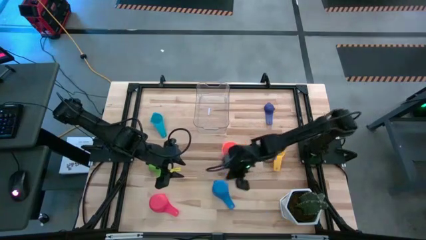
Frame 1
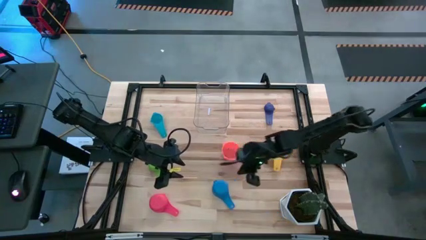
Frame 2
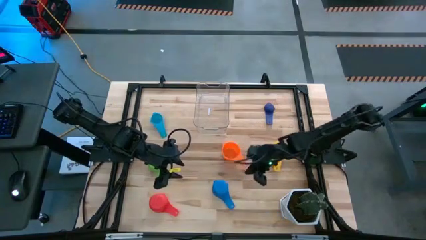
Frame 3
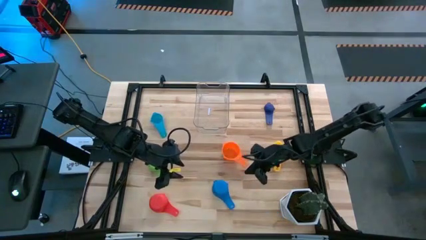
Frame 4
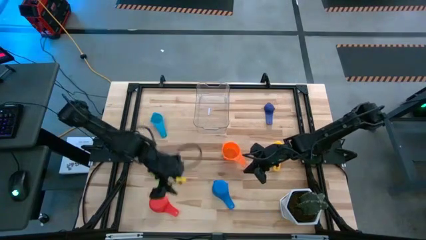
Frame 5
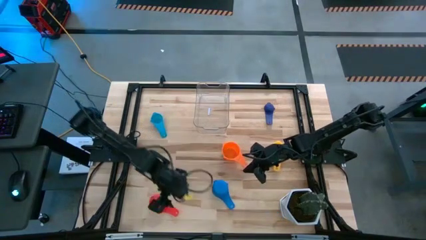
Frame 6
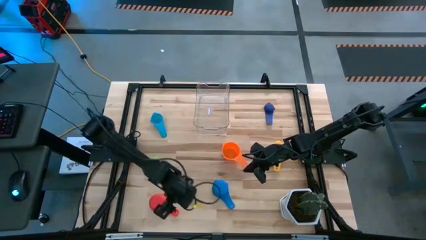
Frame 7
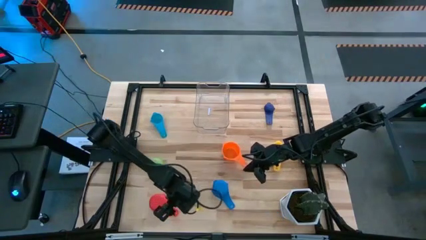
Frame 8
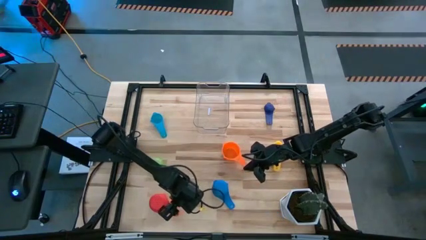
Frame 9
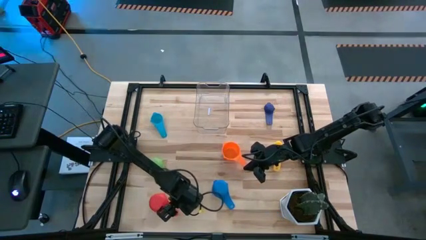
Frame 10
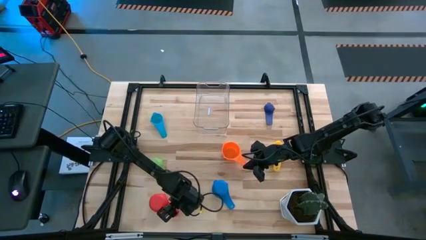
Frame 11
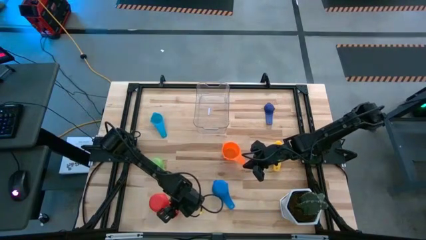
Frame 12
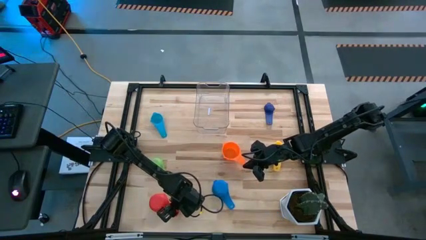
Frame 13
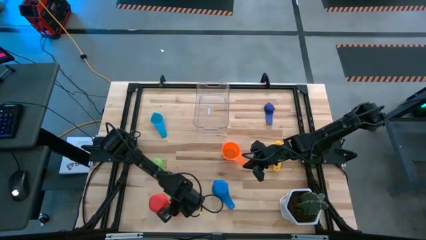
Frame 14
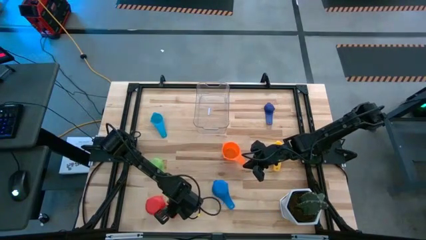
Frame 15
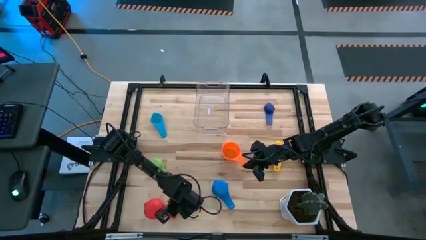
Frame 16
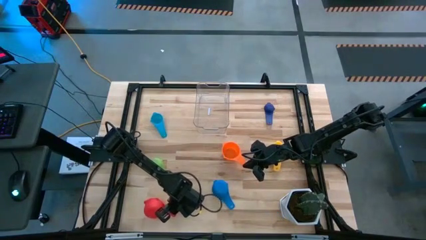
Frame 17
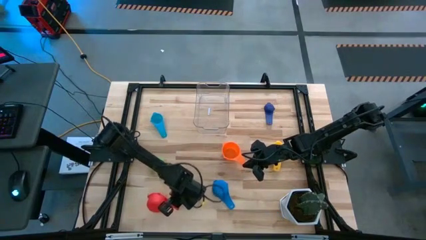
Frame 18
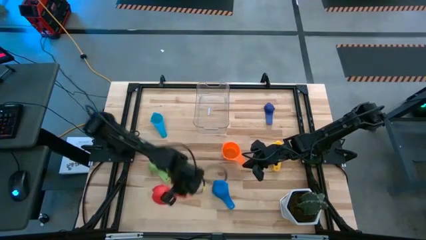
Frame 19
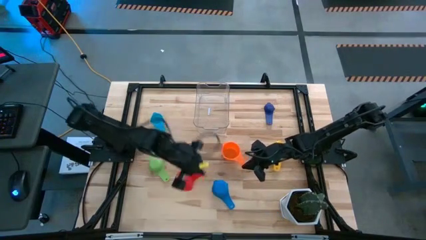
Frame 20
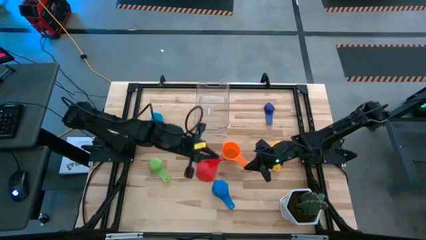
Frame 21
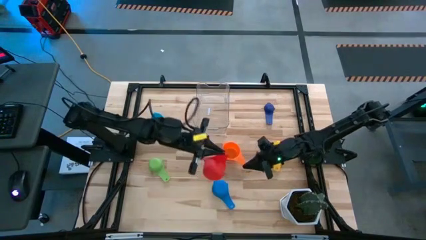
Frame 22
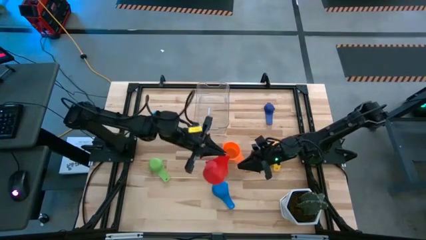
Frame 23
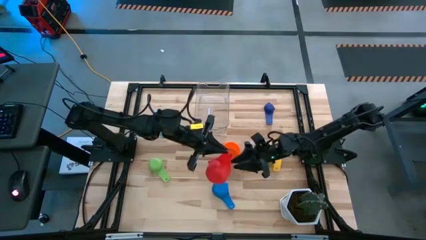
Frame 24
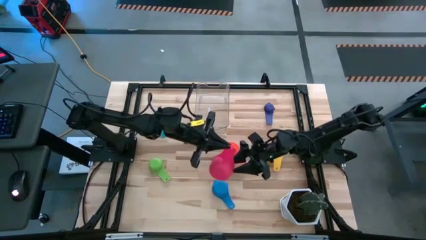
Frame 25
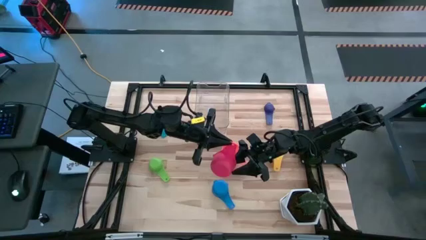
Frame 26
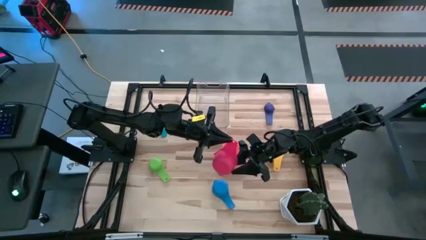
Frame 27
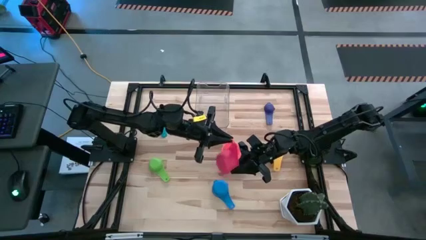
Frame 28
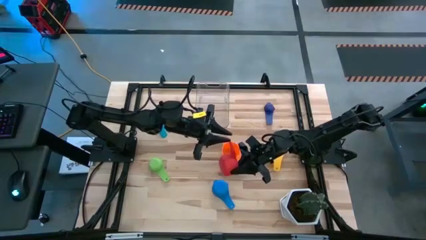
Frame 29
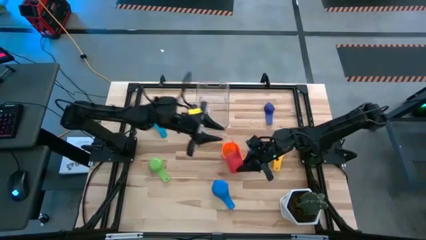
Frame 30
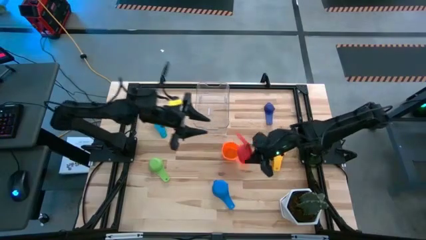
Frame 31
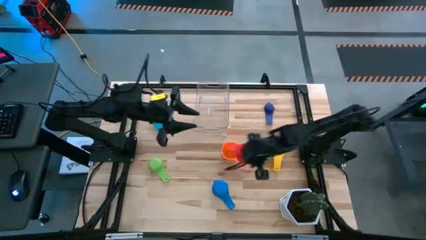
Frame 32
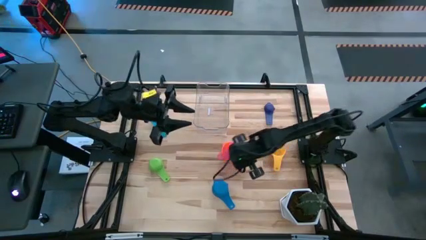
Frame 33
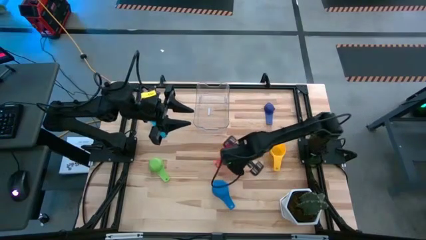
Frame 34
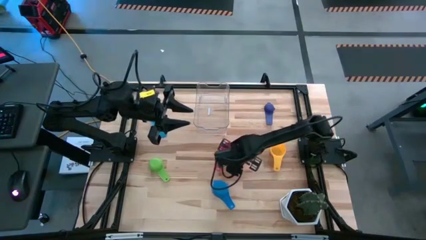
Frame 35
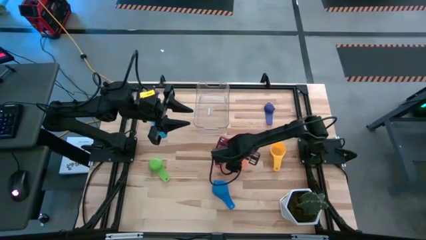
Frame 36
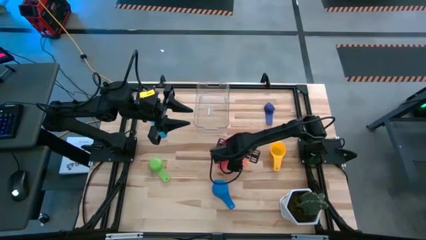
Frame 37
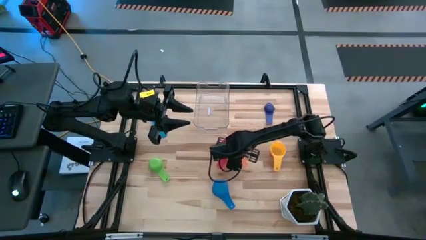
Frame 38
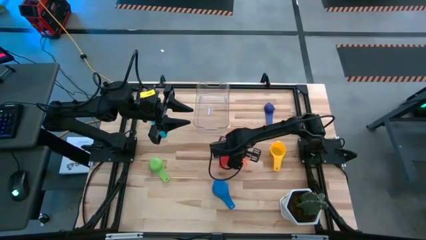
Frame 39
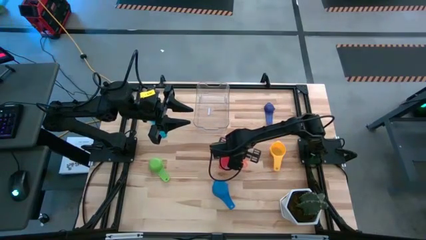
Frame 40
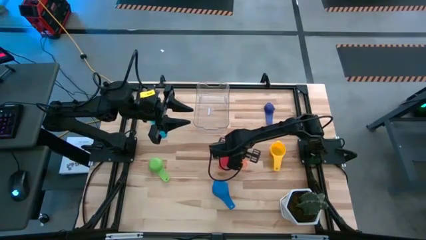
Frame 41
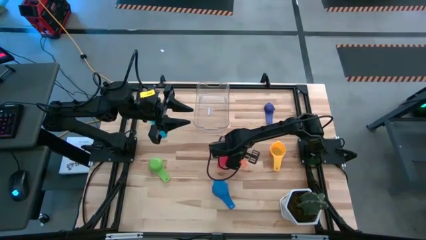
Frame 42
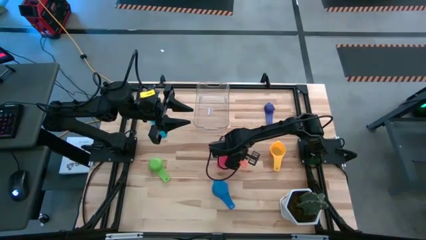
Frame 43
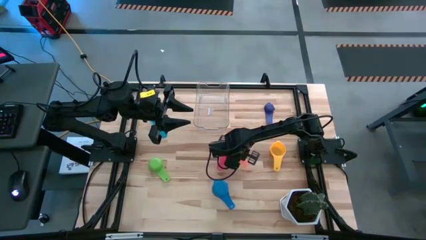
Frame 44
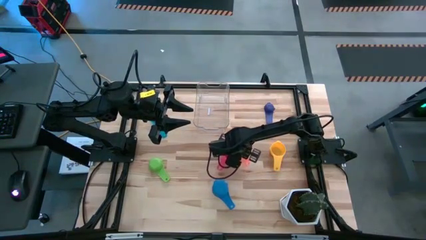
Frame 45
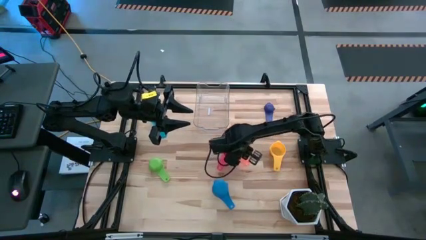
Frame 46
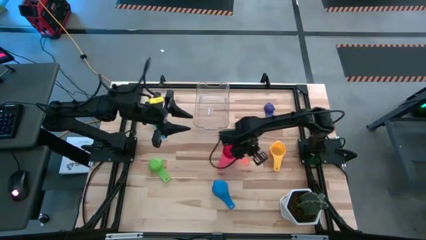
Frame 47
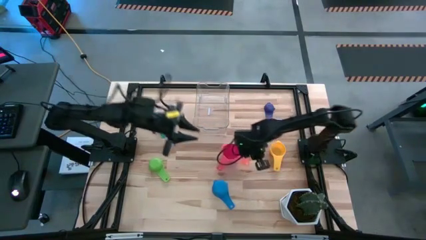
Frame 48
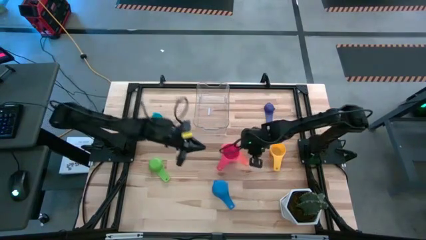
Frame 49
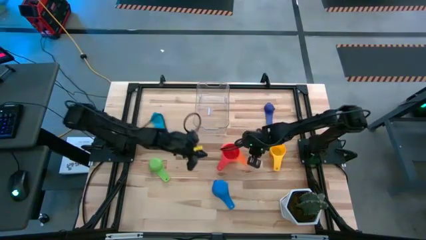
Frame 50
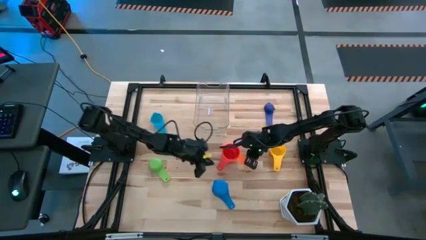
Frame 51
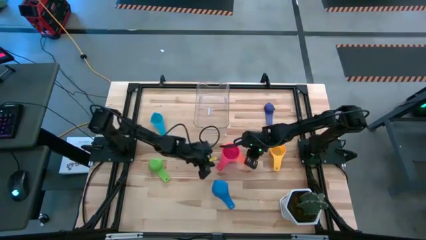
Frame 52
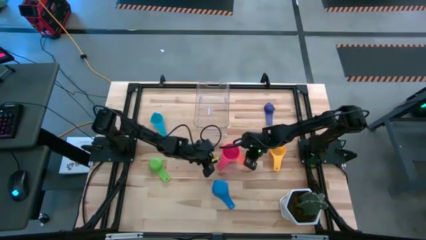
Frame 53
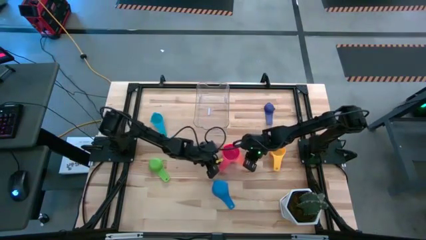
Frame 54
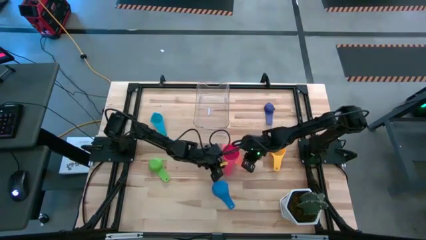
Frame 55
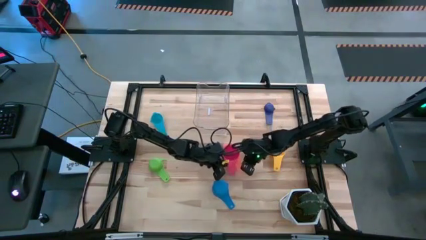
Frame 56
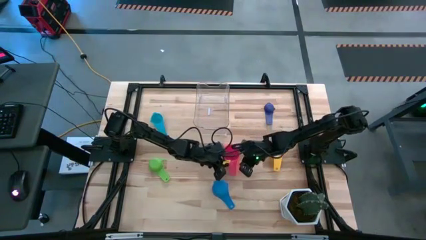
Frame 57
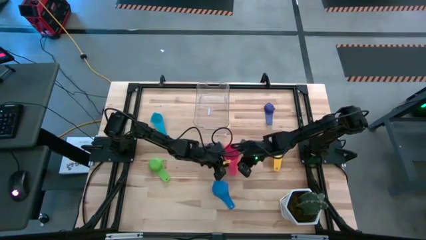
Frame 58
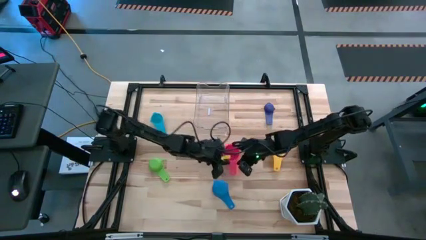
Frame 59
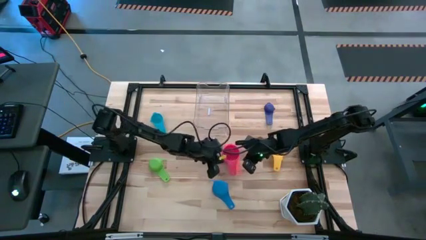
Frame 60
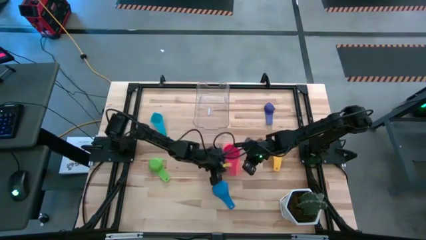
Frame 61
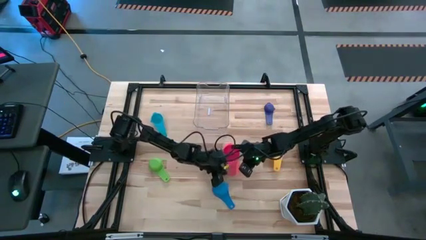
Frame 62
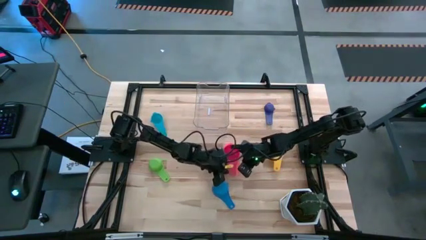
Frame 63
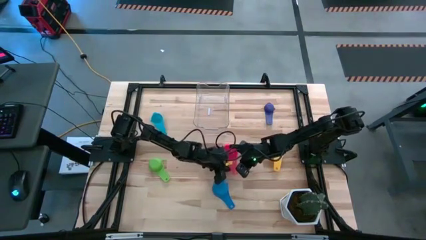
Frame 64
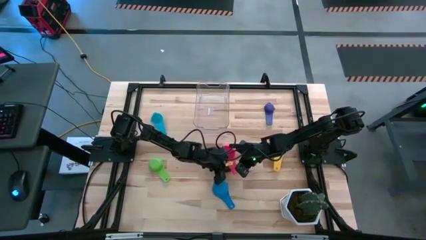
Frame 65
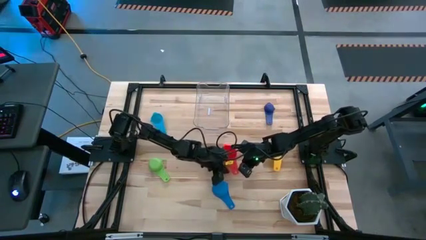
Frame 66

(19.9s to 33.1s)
Task: Nest measuring cups in basket
Stack the red measuring cup on top of the orange measuring cup

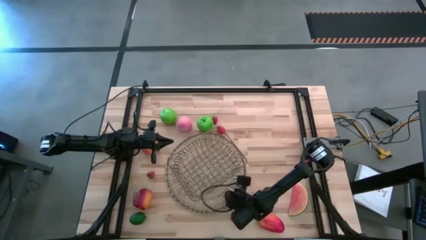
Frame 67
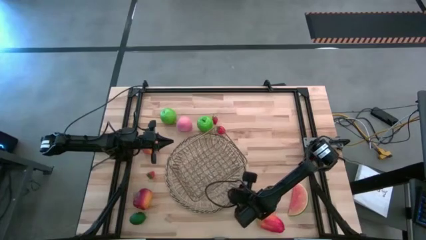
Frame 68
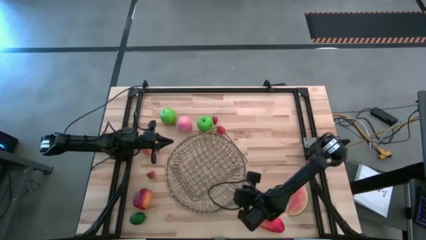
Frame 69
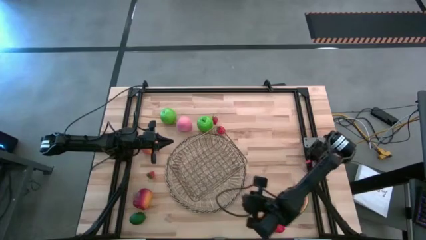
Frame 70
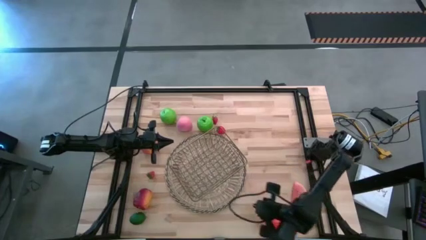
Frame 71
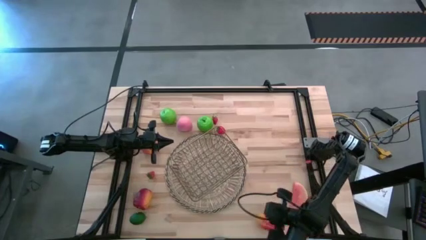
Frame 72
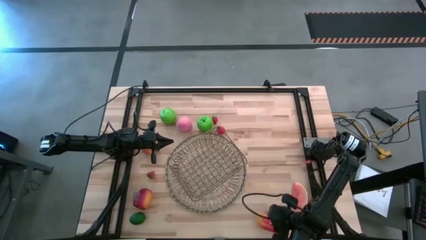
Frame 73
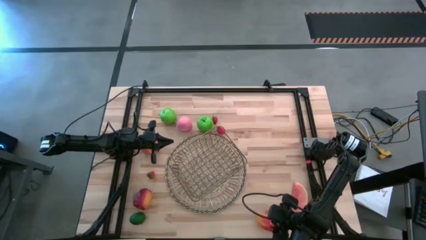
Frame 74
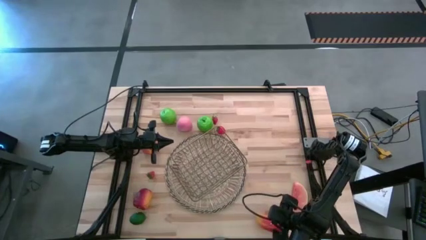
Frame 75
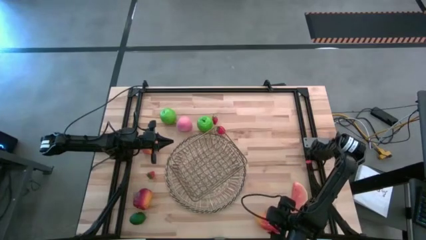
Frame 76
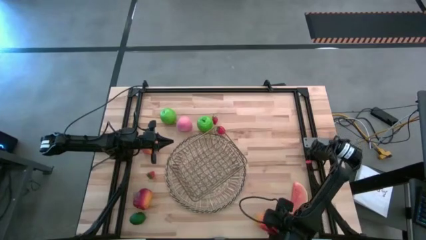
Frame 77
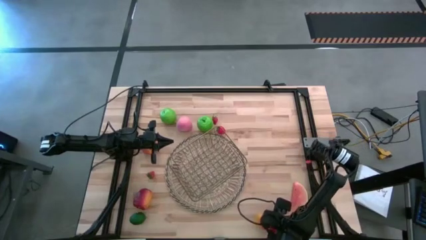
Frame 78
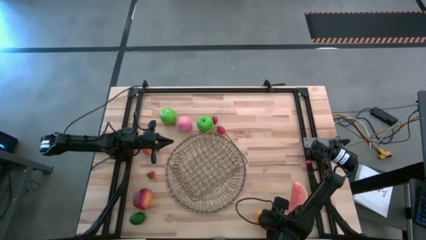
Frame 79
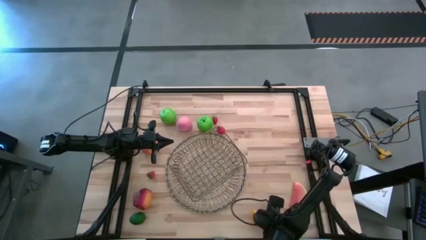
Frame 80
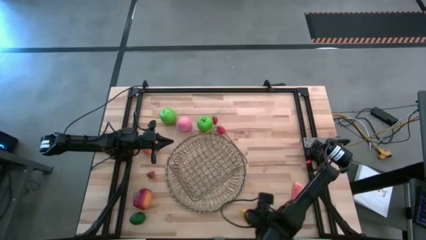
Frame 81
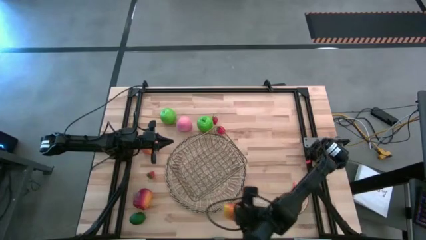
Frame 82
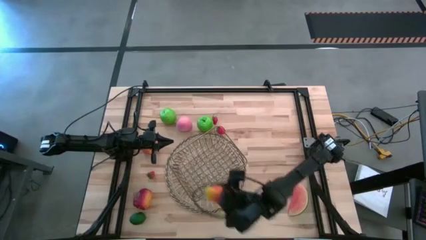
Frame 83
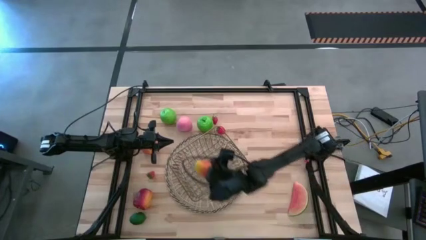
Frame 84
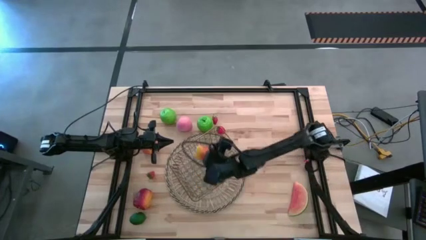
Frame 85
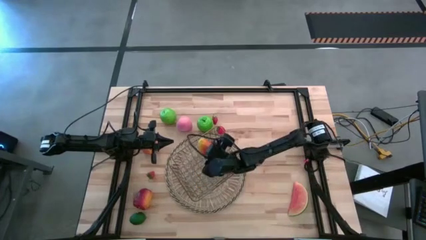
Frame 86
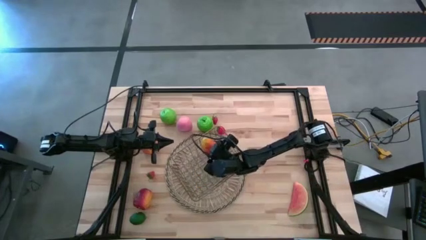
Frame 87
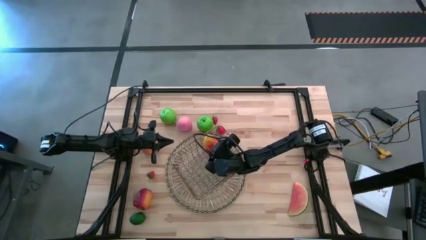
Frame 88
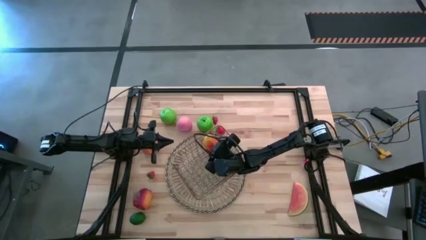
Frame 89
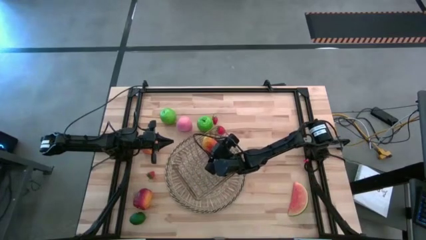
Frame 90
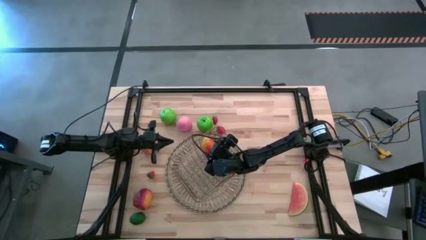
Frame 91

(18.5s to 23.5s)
Task: Build produce basket
Put the mango into the gold wire basket
